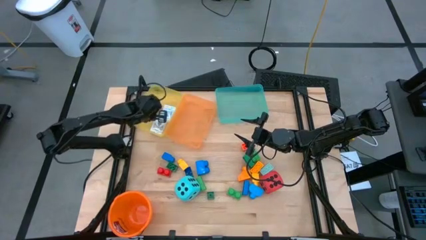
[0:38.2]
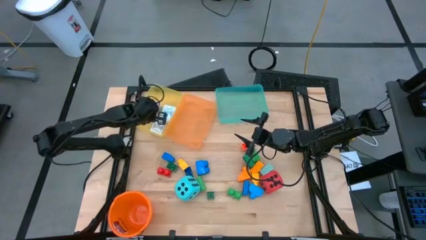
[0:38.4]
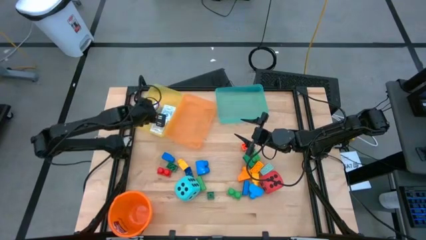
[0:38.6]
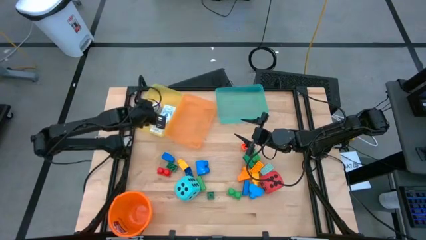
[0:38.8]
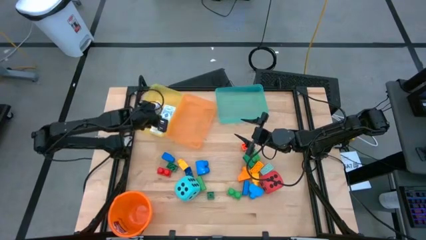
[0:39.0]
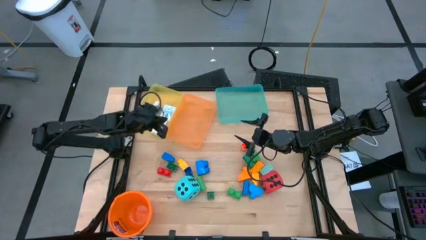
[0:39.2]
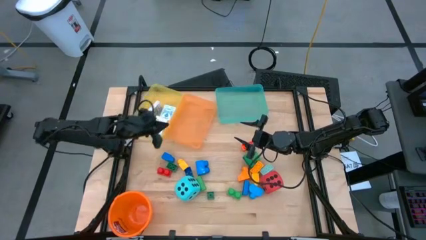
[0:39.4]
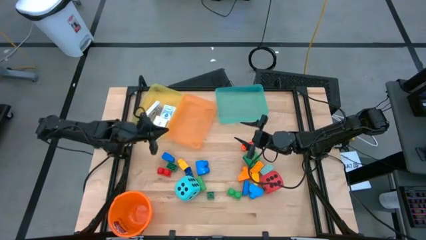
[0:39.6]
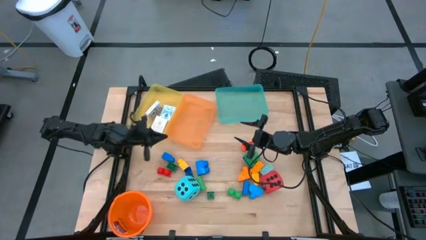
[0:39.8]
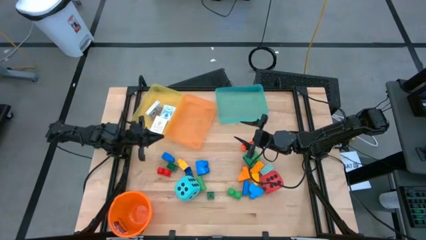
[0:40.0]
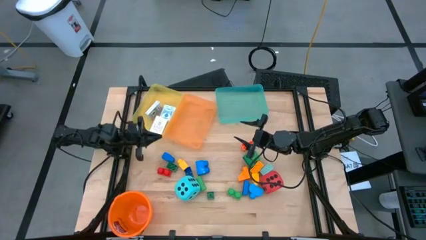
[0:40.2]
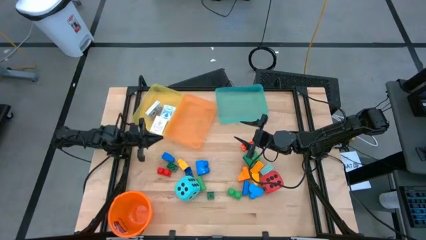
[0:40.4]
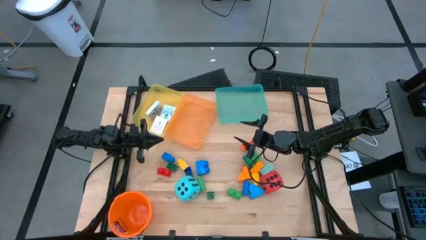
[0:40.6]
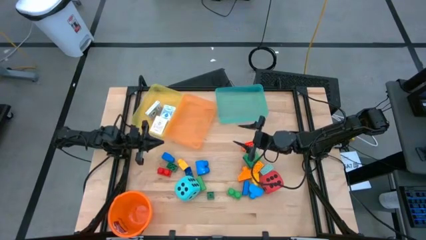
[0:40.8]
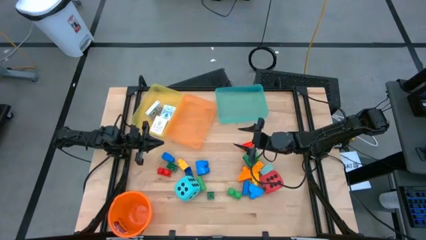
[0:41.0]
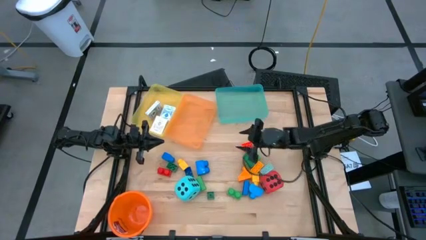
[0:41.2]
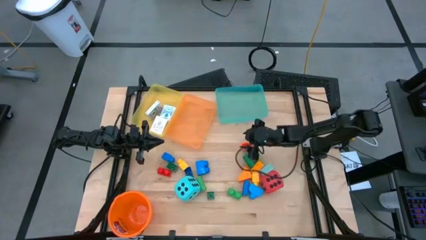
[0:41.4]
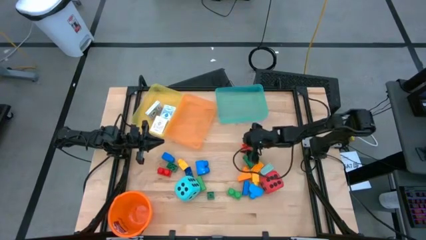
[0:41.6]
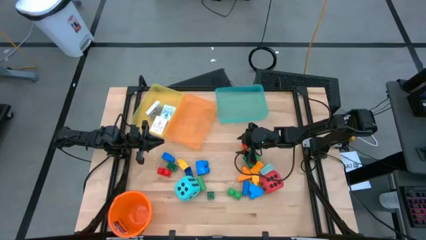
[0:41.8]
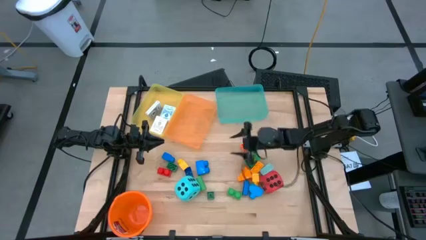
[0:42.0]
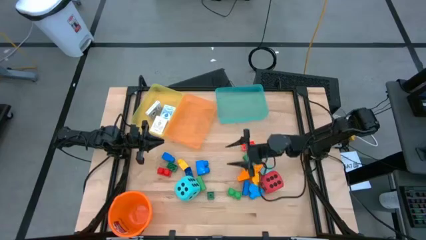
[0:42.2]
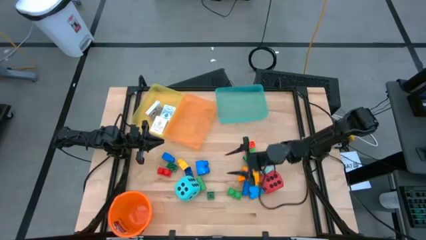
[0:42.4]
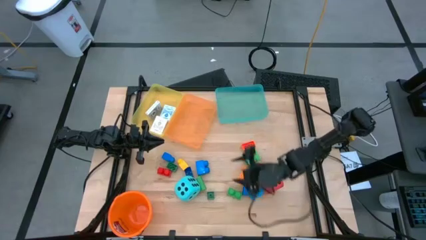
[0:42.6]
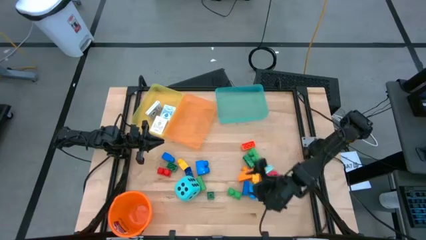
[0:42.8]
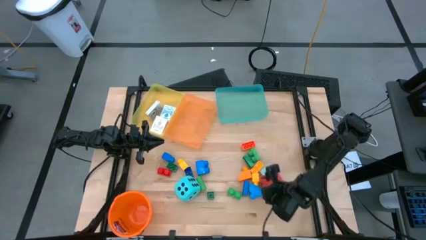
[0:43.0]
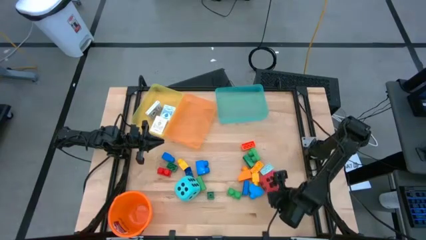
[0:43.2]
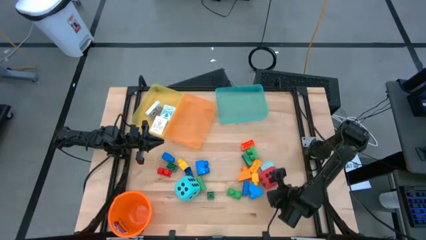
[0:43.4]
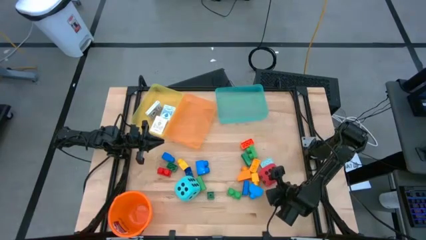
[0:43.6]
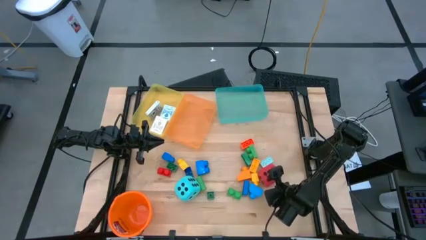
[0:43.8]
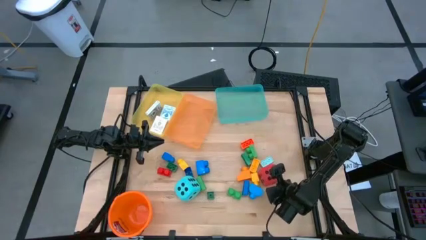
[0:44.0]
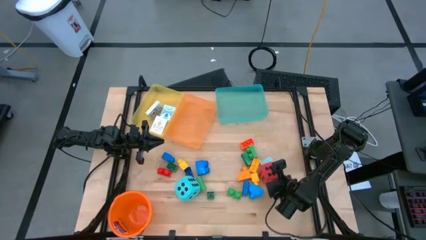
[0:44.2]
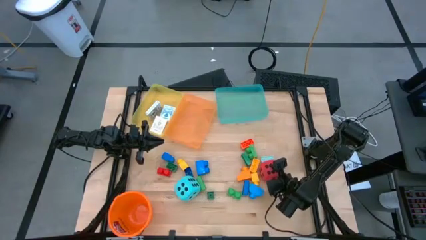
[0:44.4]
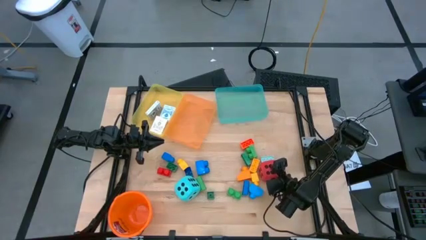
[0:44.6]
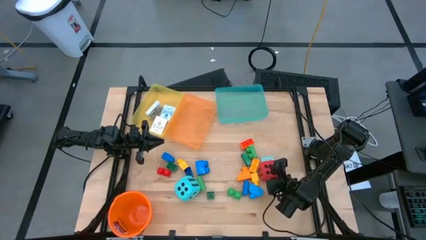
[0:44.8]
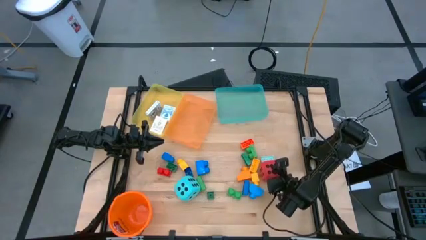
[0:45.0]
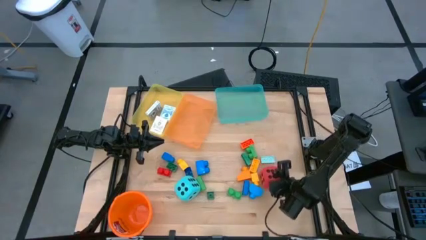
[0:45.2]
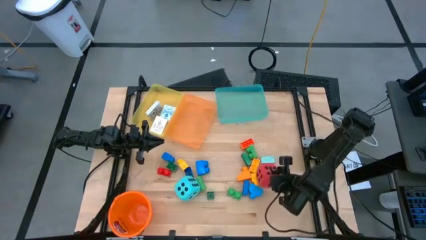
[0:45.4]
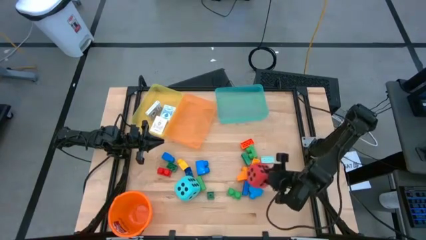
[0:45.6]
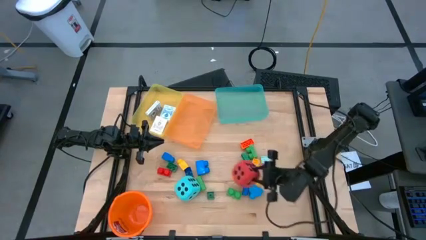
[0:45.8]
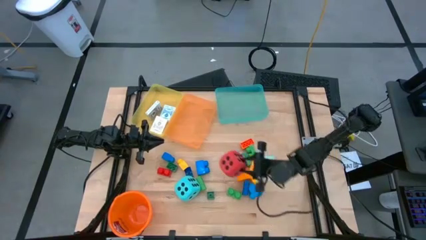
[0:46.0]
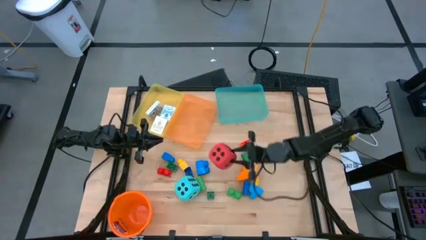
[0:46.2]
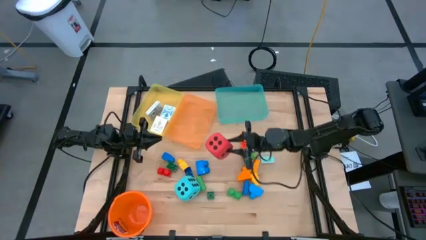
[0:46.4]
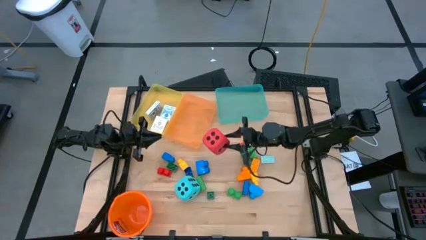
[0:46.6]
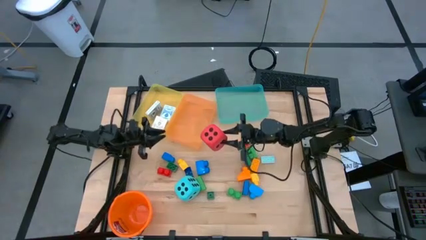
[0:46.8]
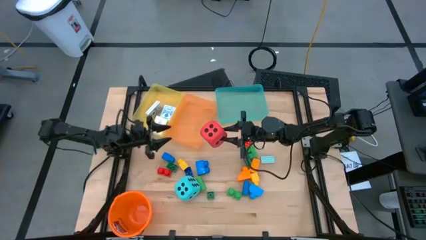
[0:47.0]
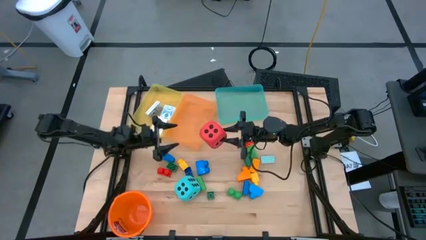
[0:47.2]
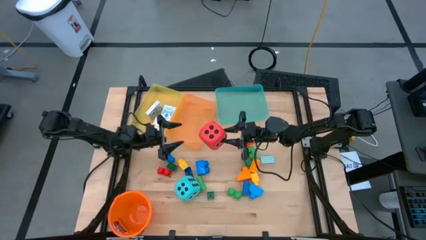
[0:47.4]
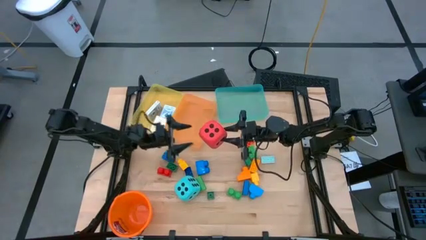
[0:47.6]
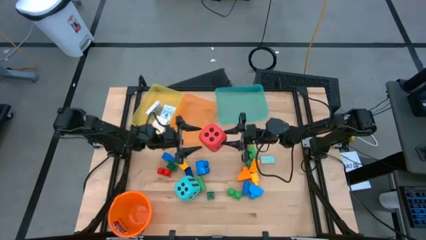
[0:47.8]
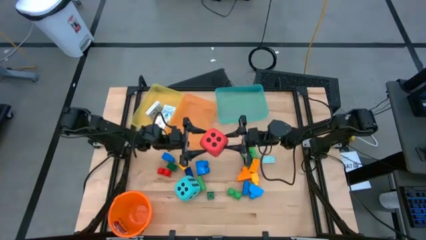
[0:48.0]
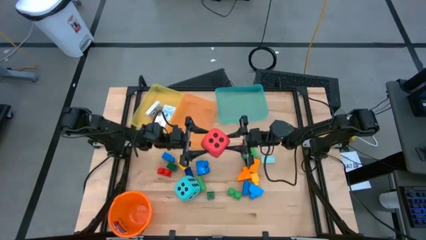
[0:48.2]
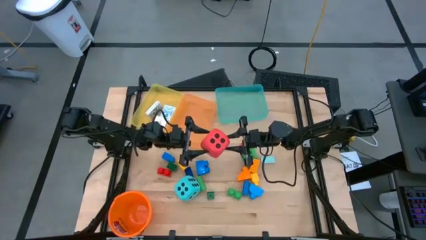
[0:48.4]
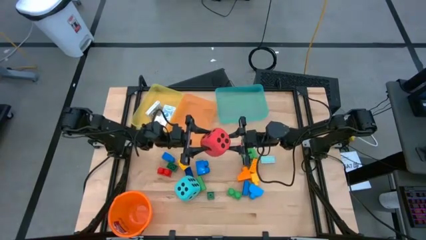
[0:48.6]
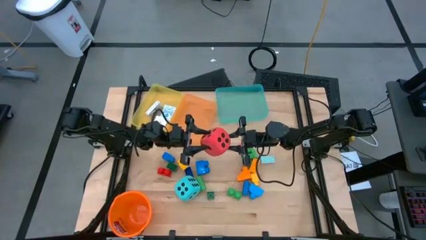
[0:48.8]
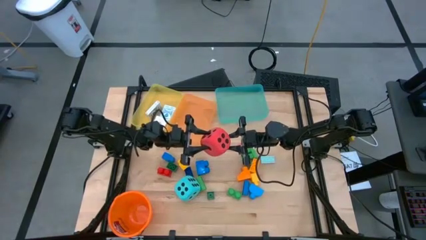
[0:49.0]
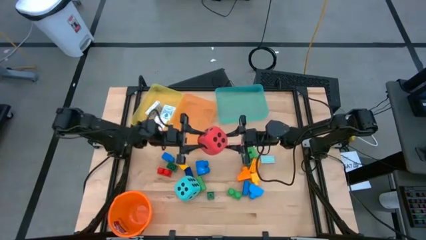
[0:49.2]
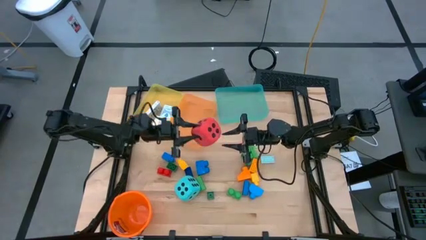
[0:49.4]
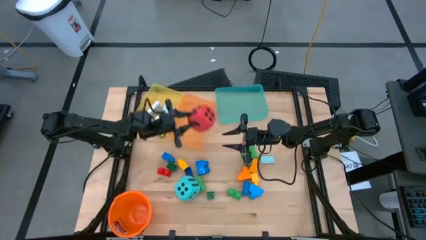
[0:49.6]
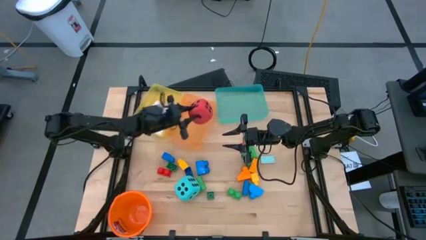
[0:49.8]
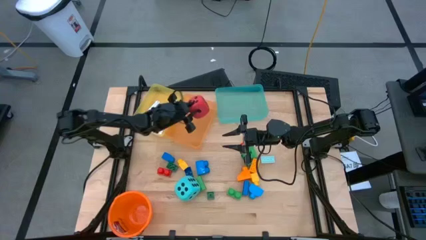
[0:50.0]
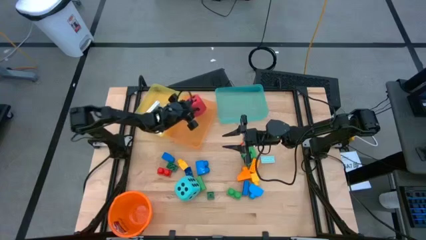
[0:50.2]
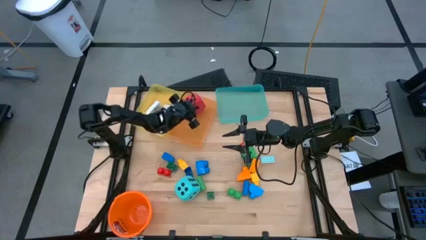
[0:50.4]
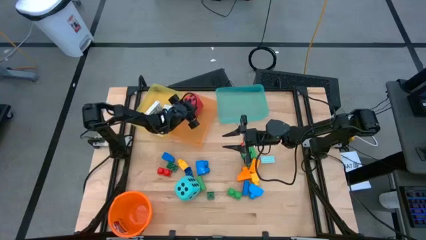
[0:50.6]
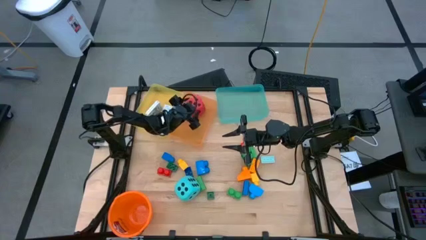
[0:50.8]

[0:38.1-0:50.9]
Task: Pick & Place Toys
Put the red dice into the orange bin
